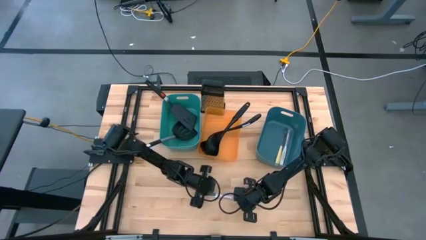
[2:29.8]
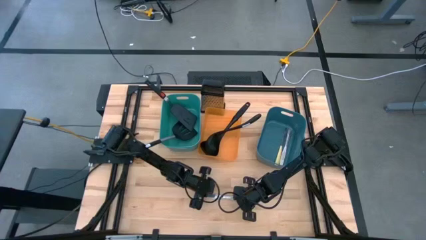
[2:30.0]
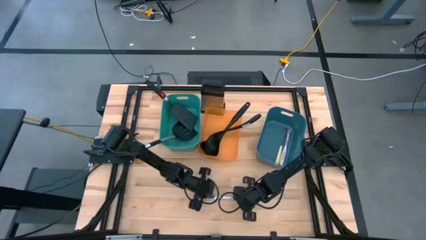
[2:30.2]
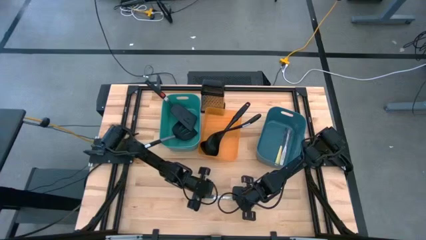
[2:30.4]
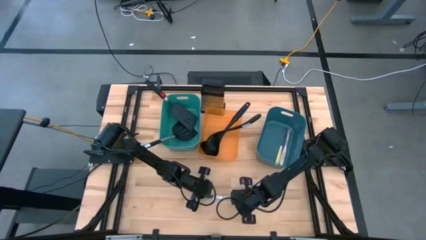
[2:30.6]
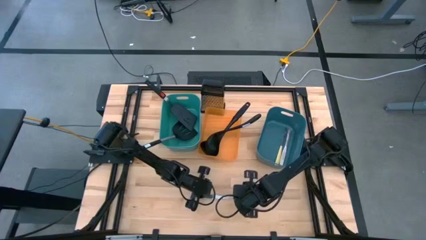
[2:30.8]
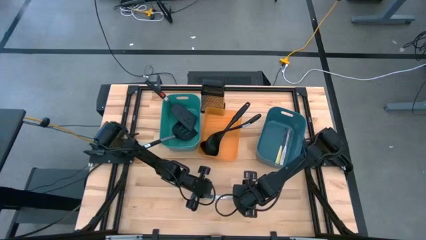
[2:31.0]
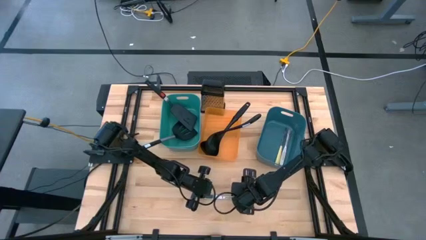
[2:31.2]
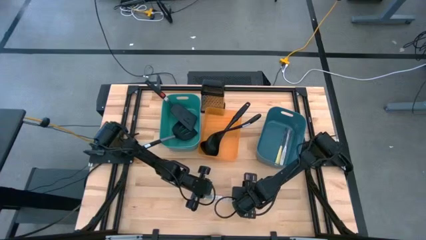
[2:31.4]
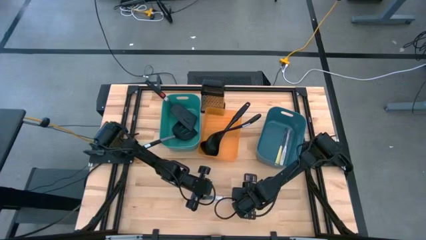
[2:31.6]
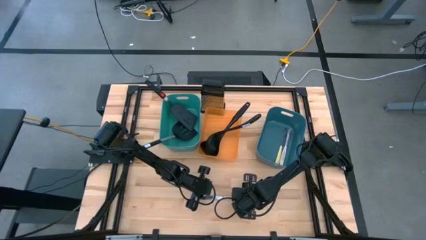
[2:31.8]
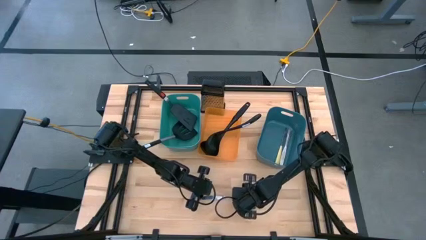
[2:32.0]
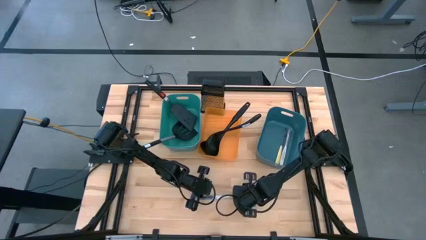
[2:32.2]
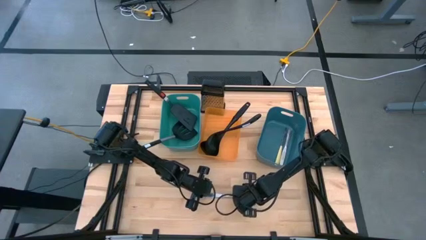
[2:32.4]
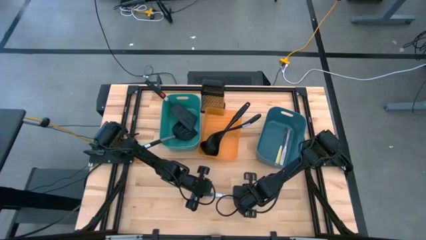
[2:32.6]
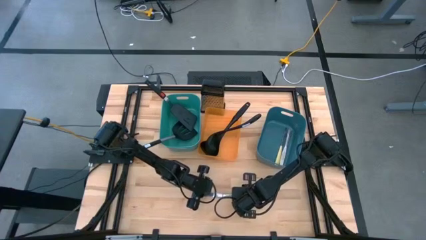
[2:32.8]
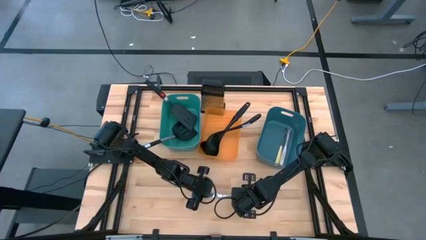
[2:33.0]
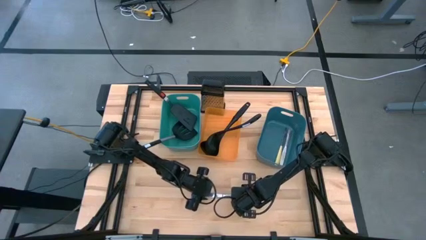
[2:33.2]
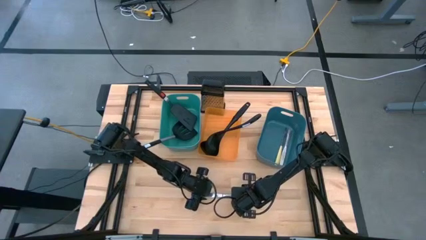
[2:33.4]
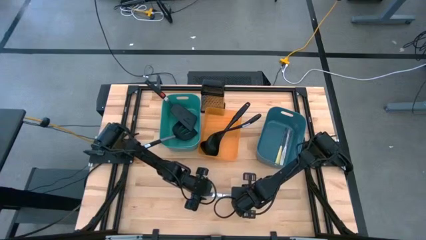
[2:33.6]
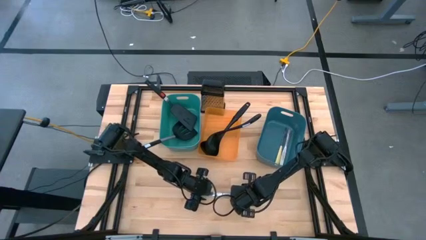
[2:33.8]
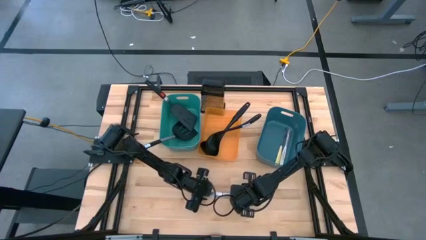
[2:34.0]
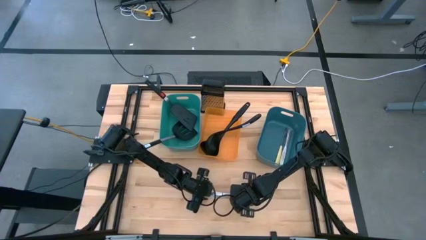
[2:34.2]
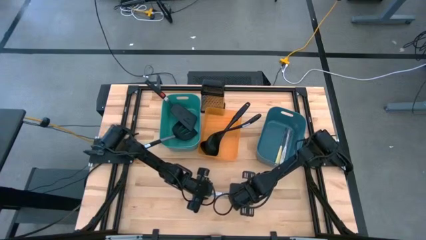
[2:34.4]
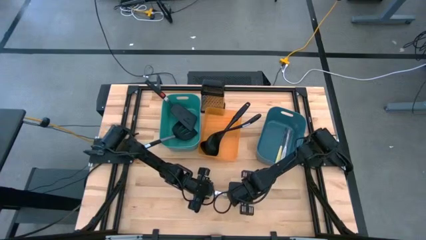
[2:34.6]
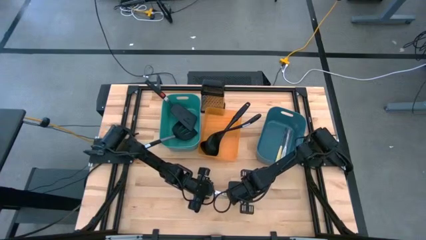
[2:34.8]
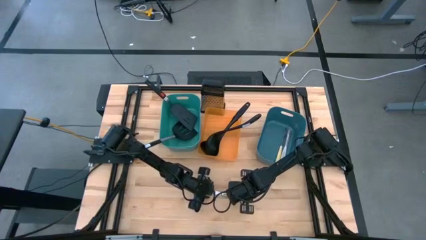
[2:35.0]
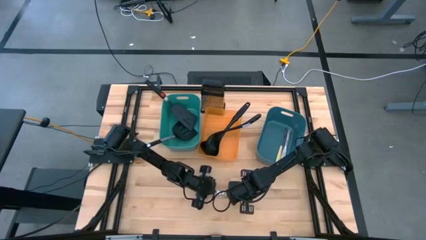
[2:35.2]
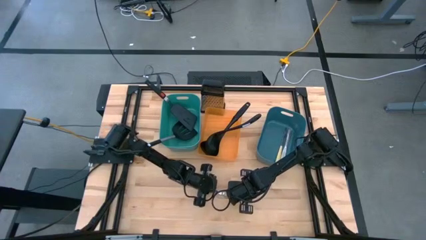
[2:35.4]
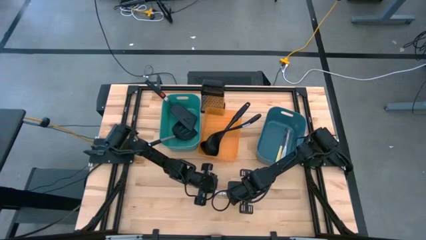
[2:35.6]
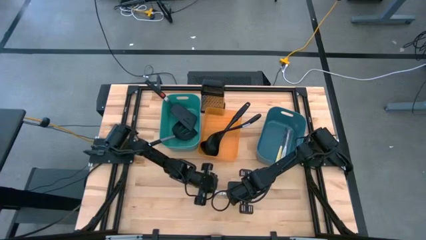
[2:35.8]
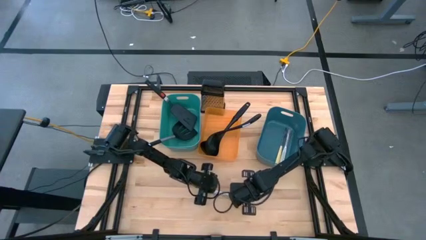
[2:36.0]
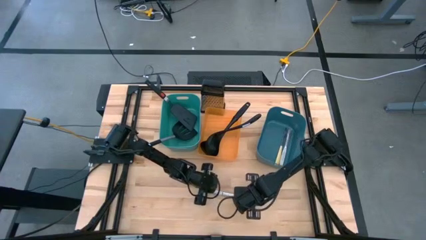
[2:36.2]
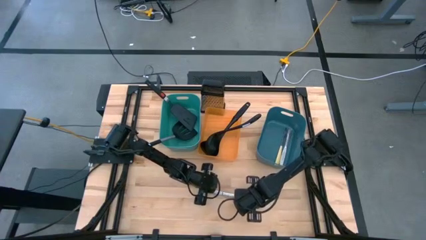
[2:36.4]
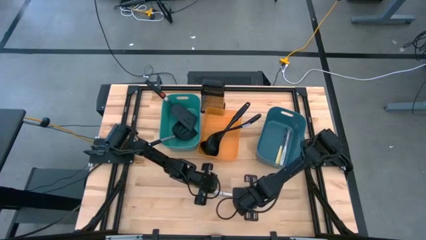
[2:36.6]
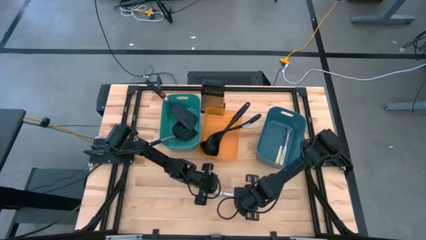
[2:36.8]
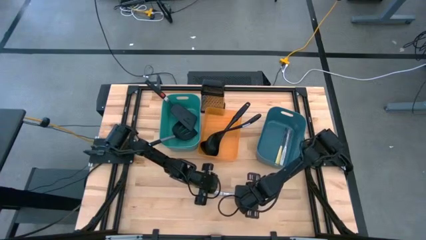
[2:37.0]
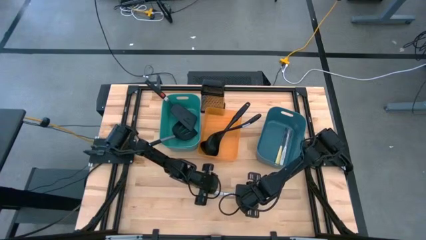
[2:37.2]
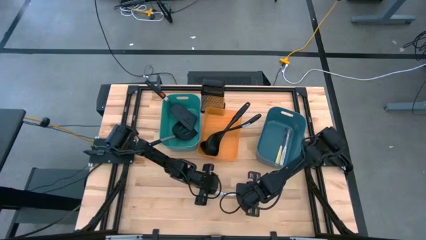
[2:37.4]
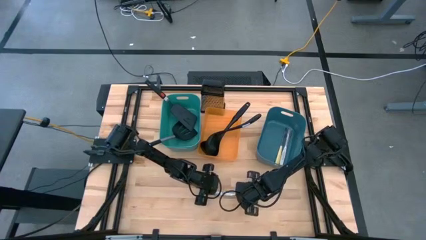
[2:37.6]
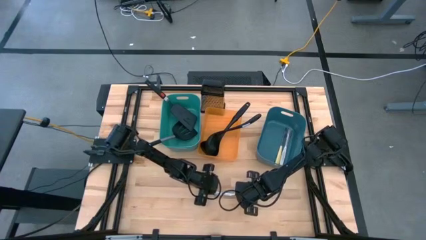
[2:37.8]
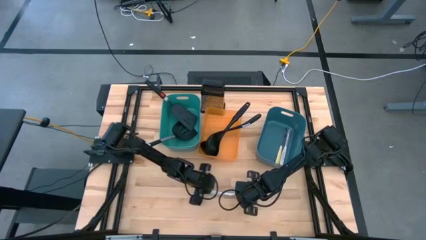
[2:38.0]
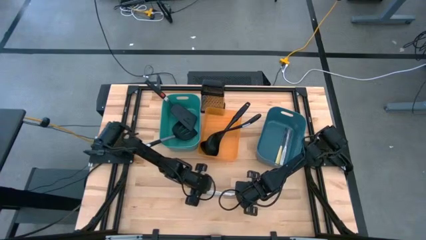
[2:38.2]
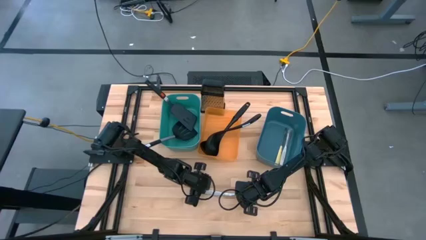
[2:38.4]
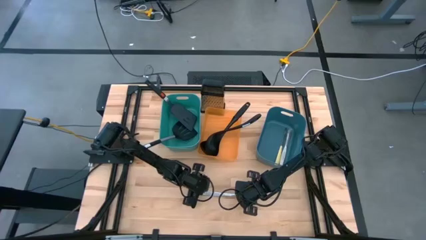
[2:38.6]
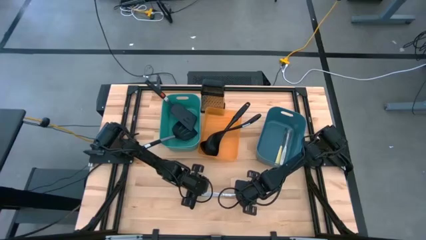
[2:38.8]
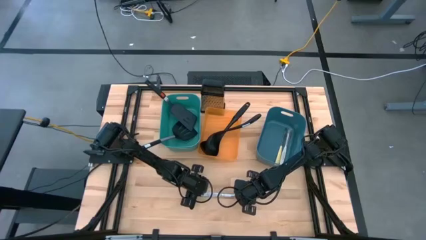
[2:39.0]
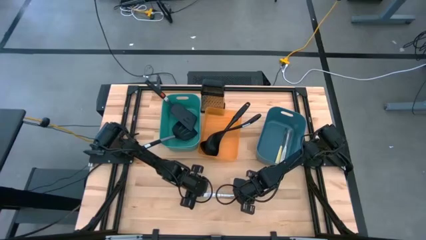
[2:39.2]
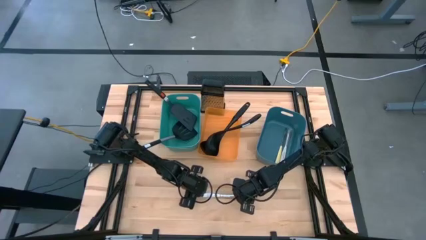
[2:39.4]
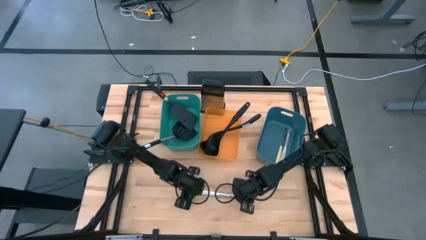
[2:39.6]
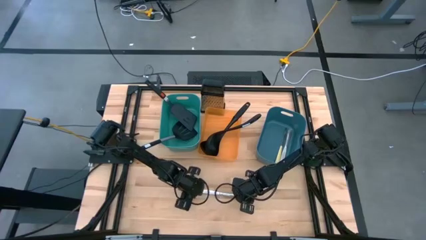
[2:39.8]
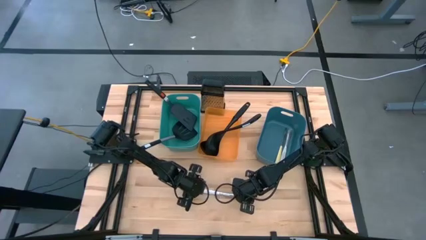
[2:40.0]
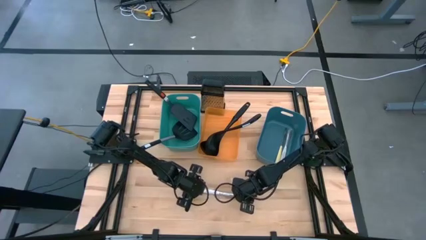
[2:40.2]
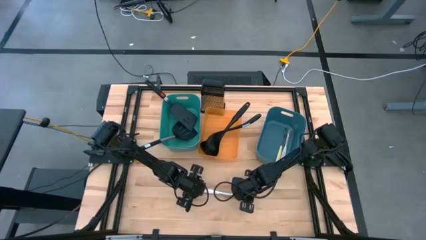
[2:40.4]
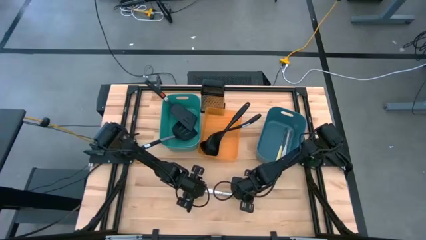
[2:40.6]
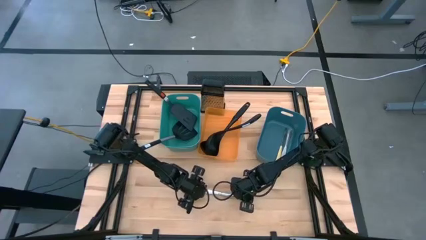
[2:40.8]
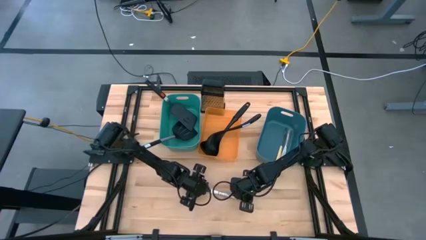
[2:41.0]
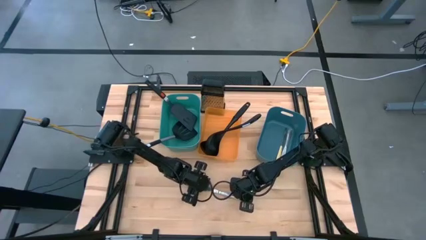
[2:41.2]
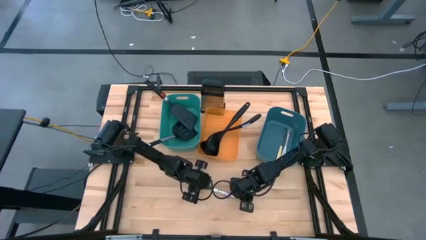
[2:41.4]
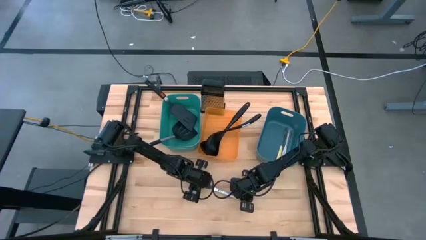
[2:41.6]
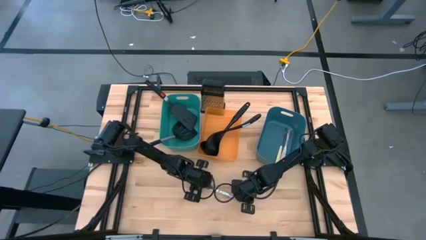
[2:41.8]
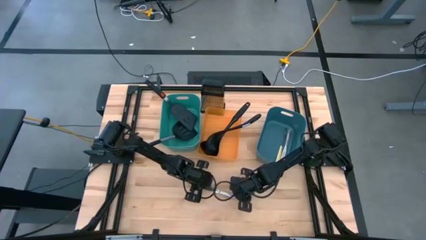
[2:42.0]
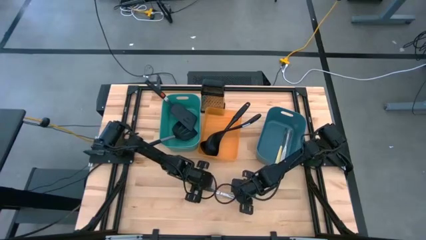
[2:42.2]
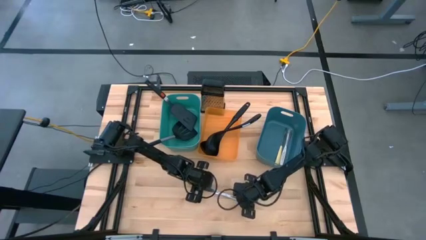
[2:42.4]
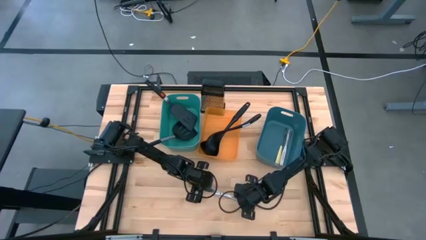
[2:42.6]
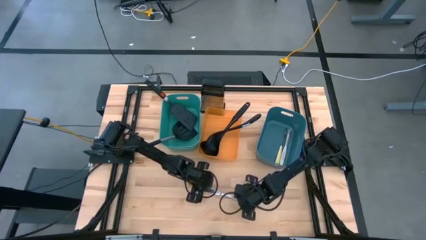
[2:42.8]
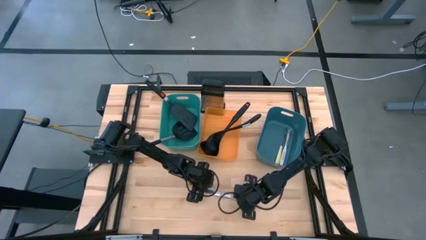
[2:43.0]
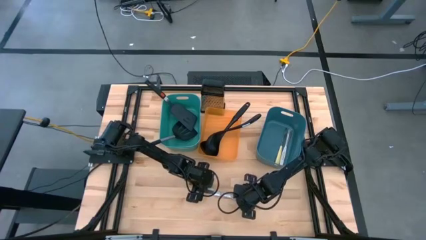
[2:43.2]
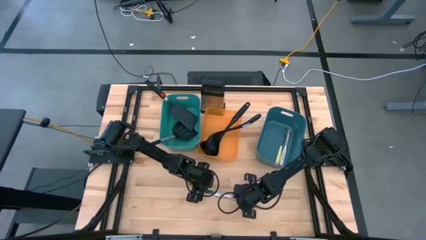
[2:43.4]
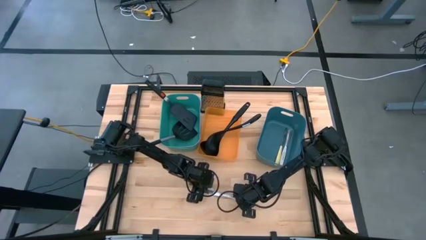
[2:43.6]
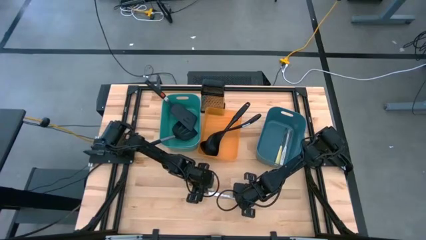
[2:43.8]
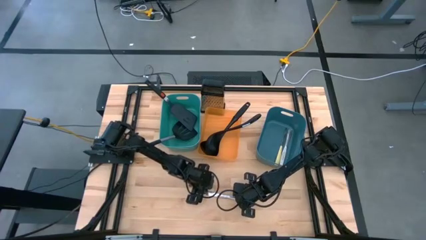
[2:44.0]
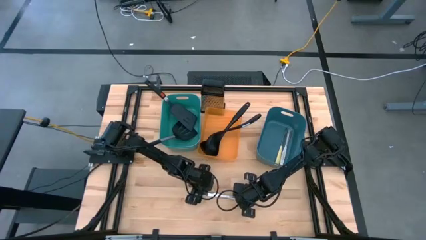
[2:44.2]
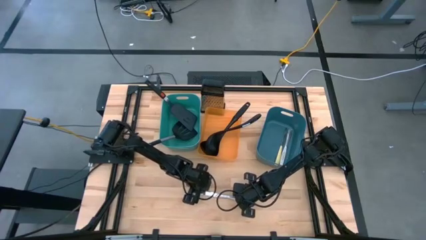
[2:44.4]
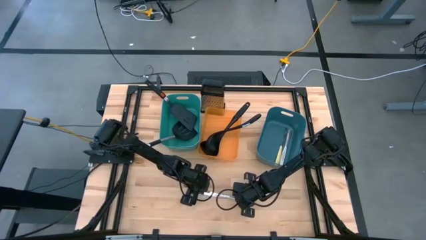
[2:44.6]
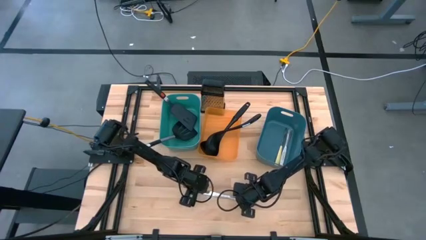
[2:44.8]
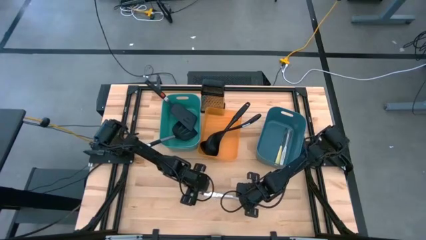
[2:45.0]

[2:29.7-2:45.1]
Task: Pick & Place Kitchen Items
Put the silver table knife into the blue bin
